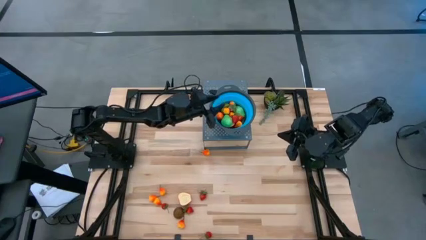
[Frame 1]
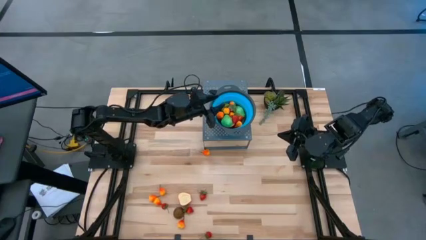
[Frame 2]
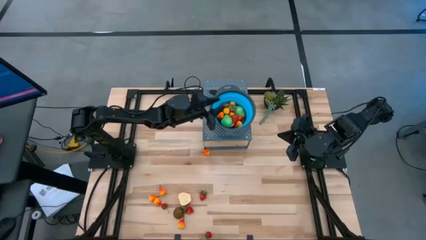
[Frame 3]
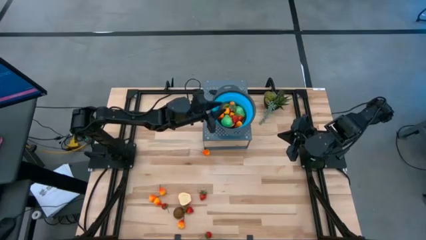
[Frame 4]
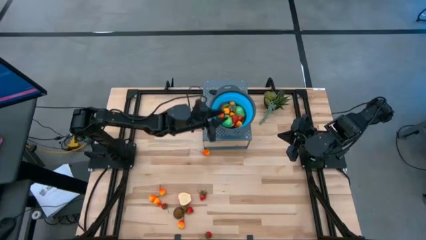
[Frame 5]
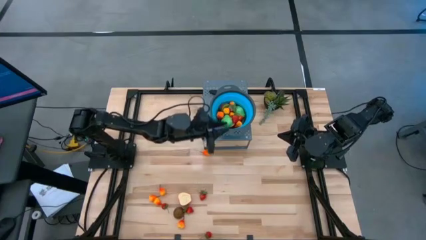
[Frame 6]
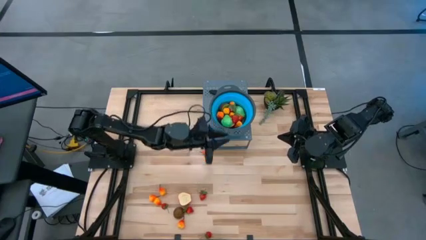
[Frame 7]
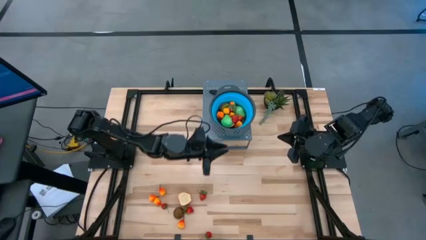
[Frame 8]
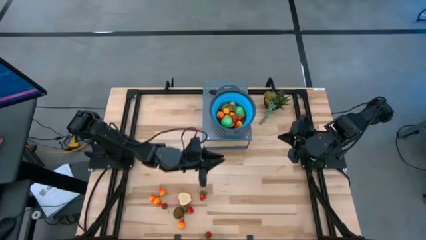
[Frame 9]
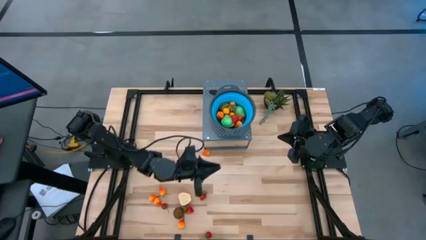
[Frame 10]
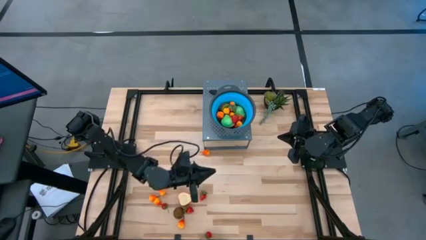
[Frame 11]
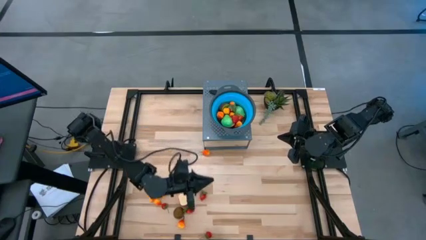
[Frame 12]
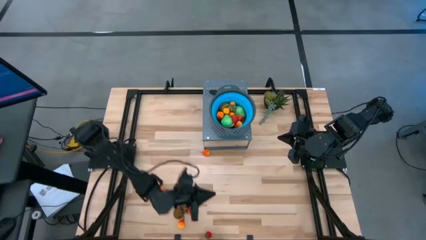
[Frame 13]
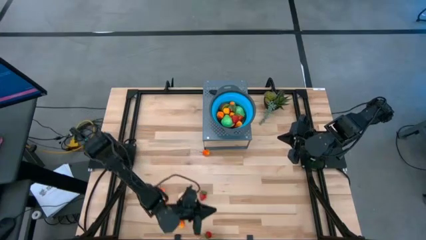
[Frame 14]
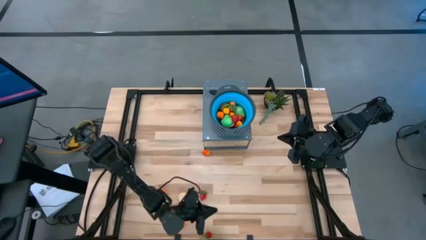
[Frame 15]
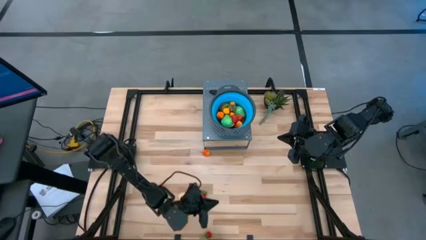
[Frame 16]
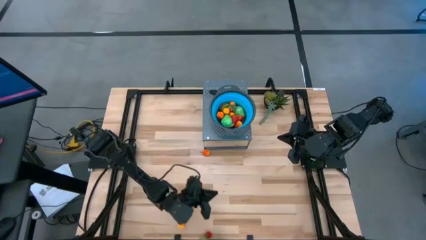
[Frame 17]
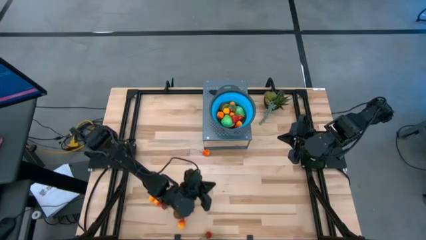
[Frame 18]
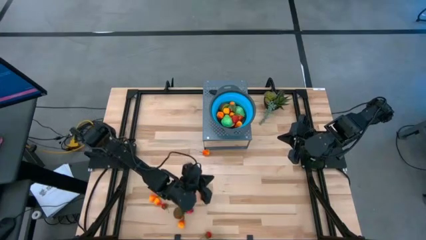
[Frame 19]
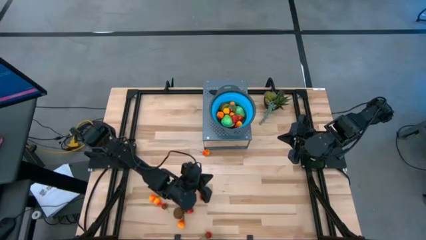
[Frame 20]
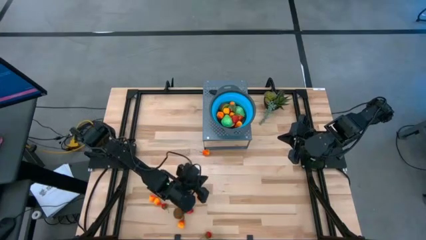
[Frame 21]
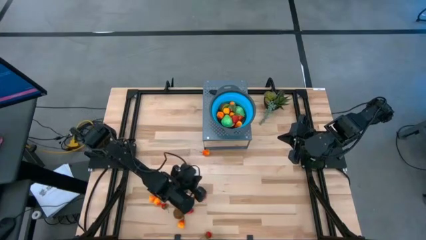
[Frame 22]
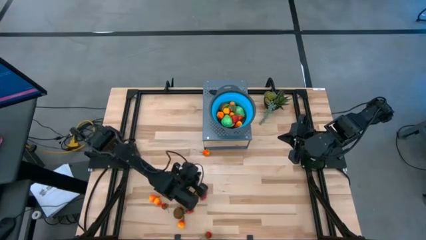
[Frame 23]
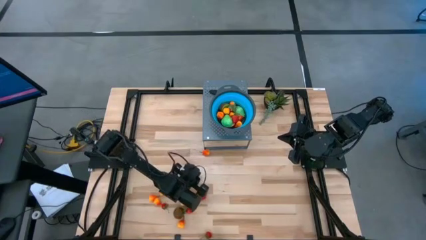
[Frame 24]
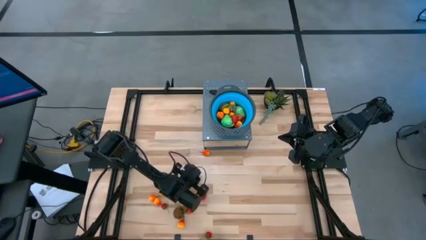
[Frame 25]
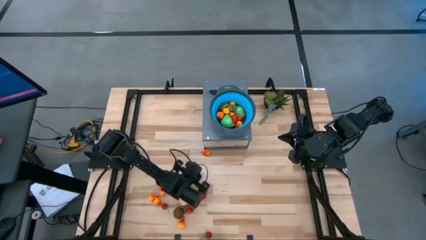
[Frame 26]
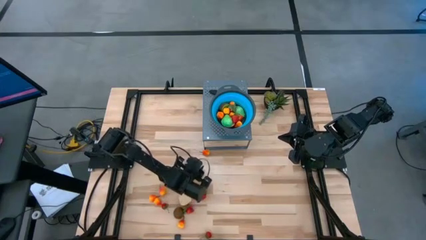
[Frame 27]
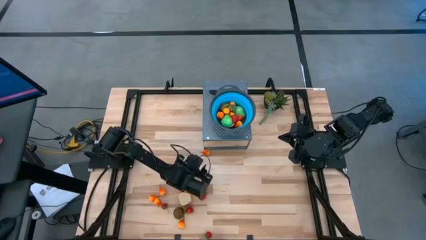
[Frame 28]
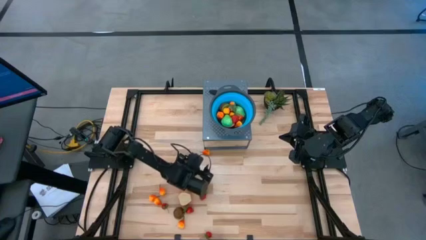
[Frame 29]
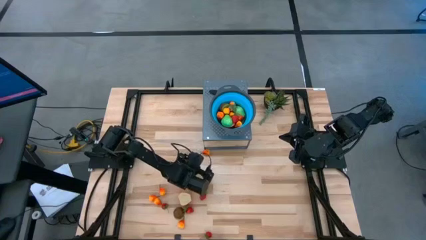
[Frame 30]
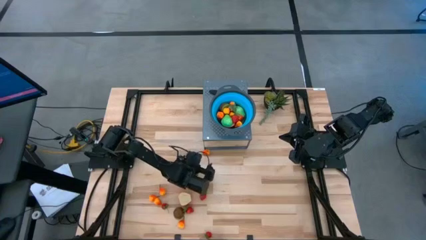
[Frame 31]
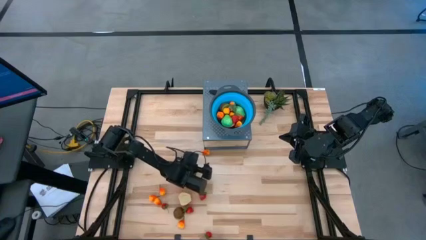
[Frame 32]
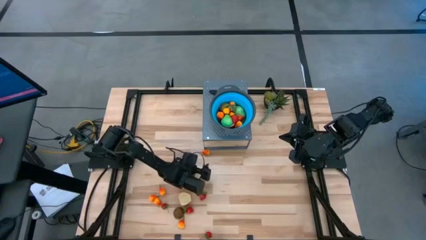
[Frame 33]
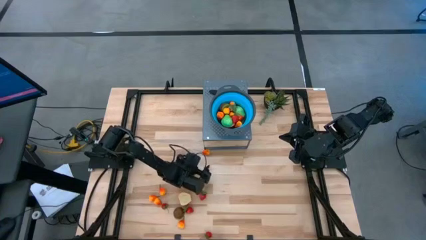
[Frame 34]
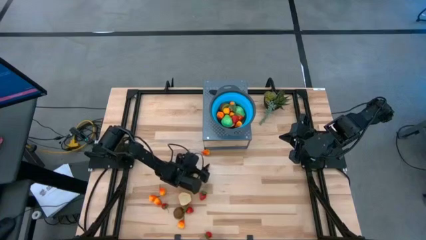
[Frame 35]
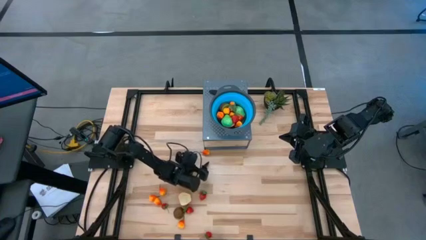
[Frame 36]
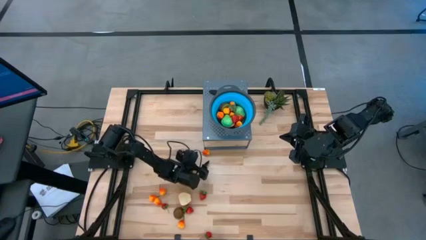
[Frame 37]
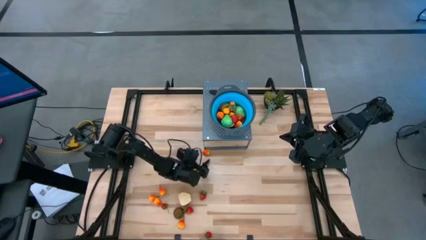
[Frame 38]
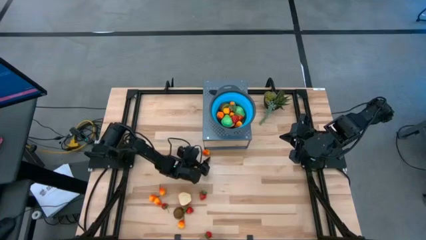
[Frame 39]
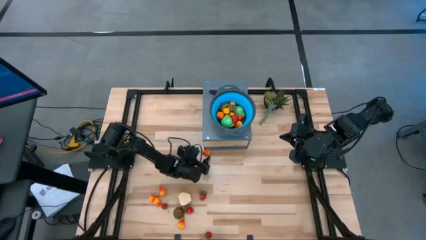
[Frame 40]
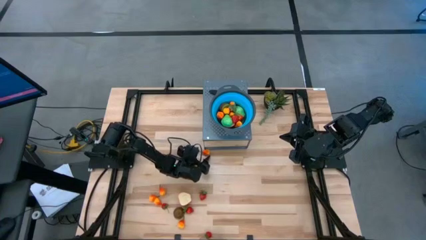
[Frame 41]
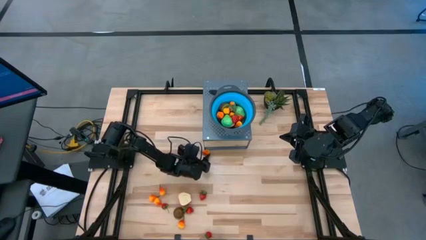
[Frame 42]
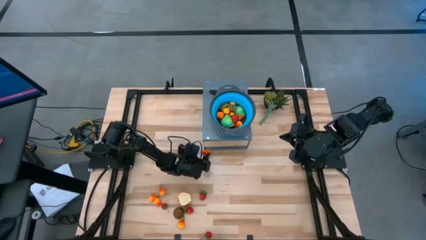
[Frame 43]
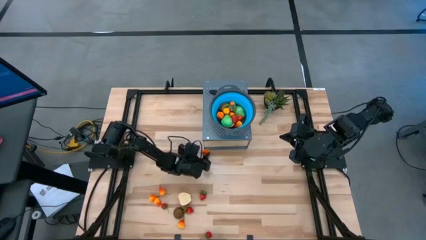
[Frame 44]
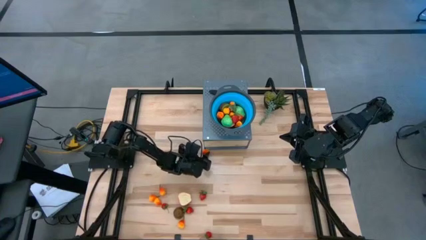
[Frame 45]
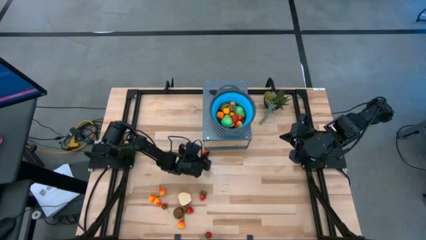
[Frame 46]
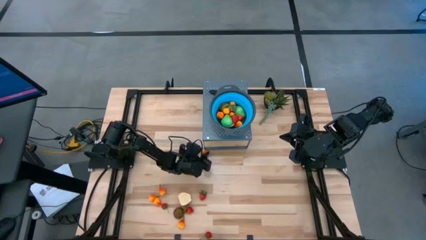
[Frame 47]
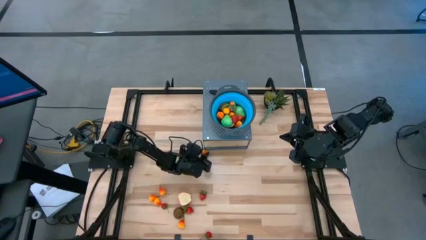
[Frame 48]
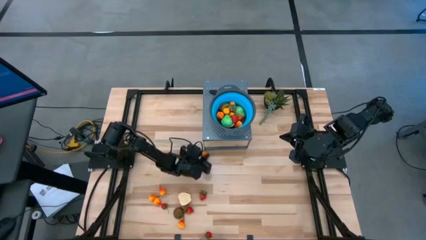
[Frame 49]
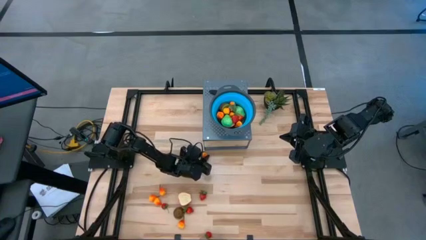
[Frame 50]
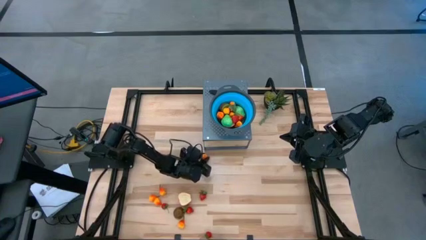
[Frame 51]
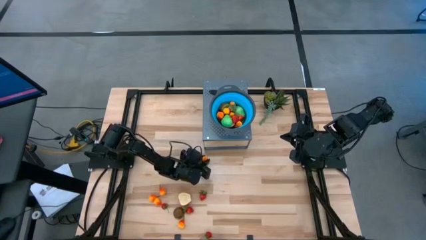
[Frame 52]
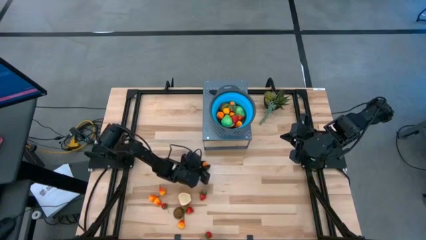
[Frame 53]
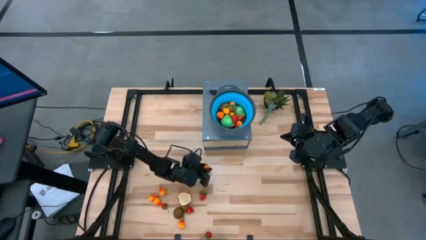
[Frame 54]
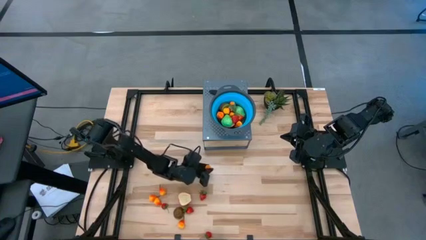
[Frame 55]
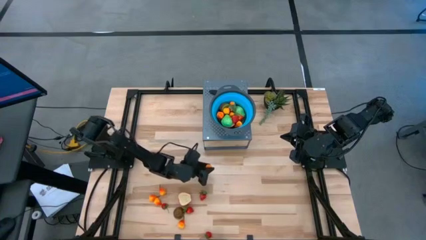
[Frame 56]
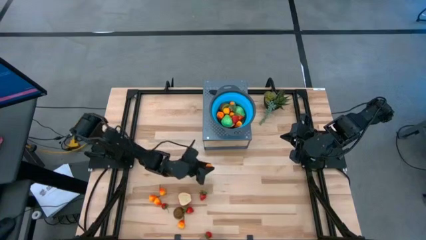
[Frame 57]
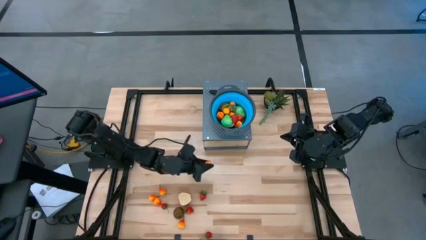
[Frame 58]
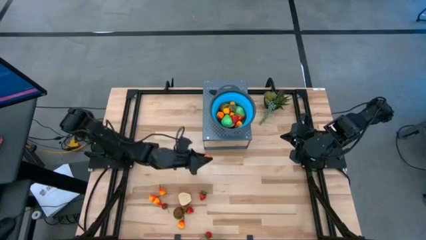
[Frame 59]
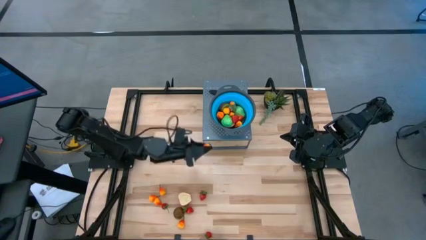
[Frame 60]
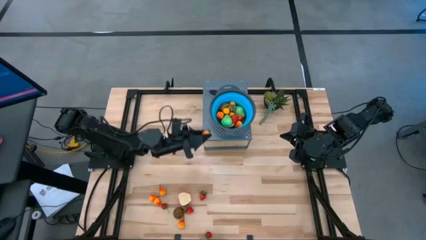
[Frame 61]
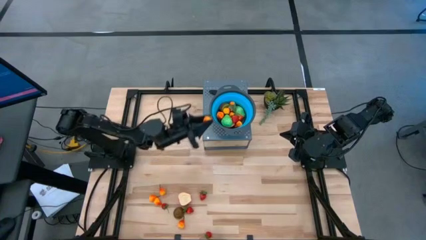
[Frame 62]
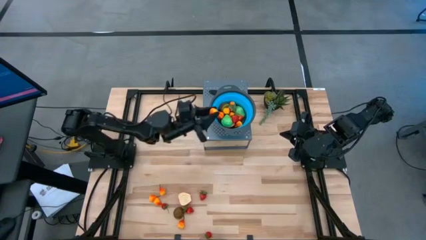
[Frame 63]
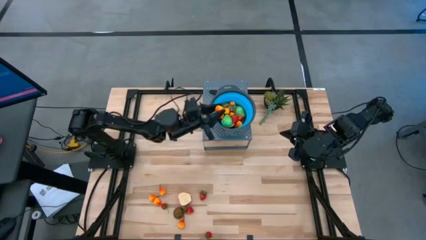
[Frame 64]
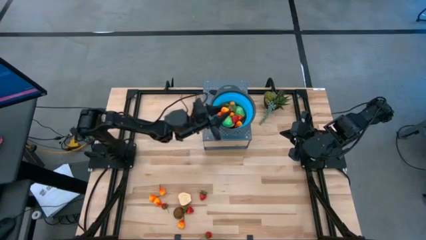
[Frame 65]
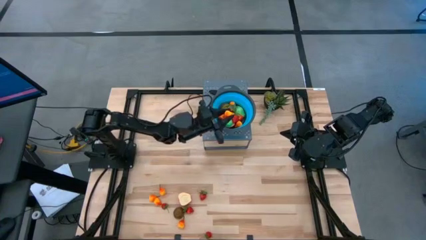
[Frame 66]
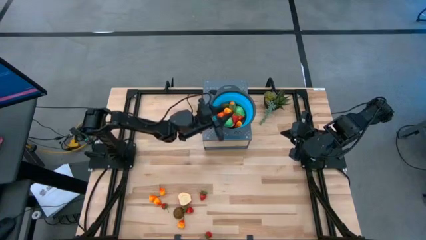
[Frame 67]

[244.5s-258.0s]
Task: Pick & Place Fruit
Put the peach into the strainer bowl
